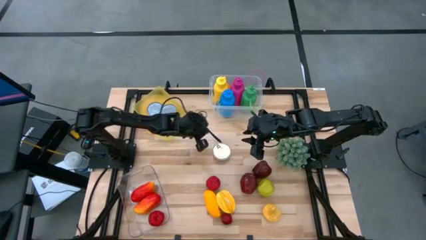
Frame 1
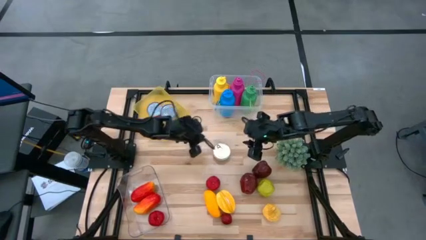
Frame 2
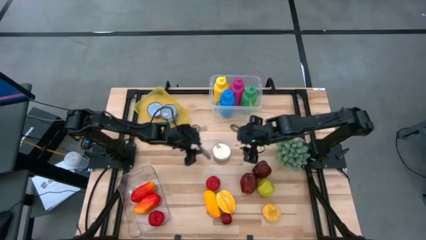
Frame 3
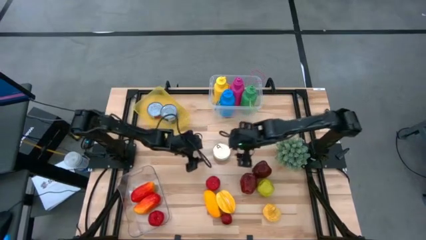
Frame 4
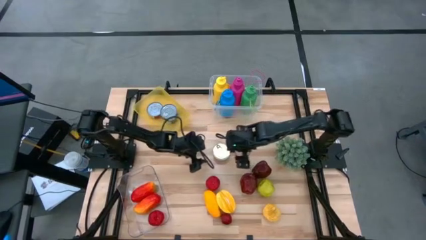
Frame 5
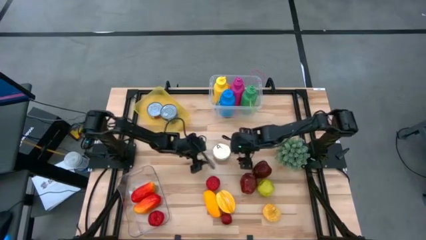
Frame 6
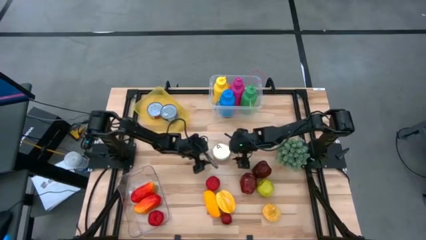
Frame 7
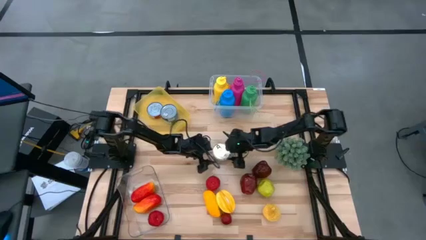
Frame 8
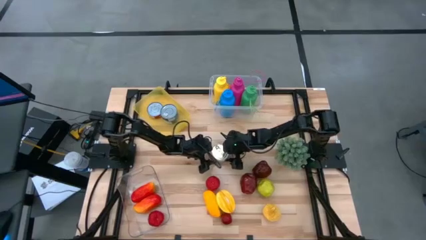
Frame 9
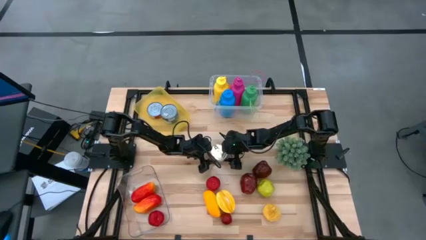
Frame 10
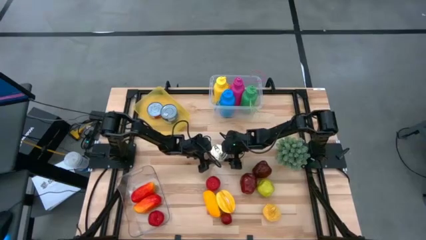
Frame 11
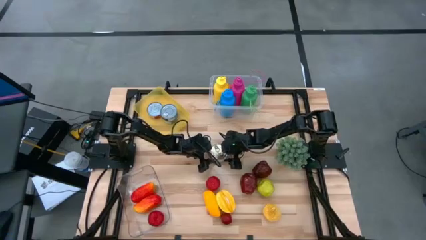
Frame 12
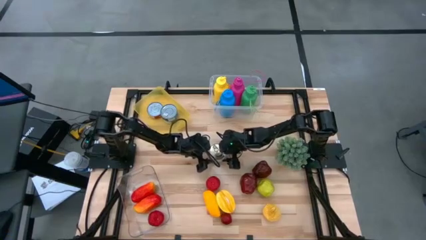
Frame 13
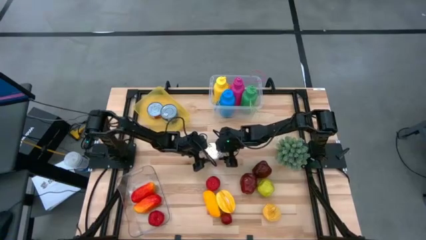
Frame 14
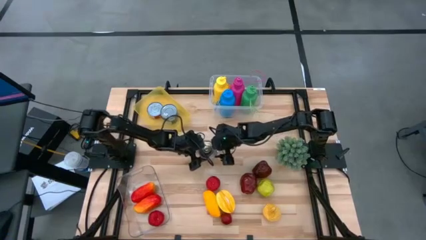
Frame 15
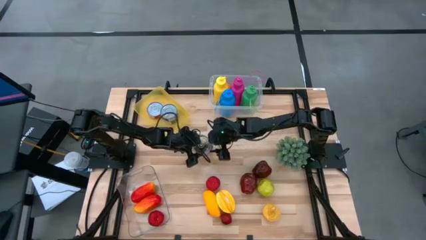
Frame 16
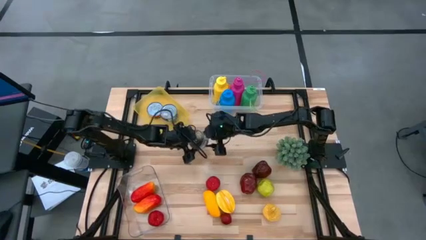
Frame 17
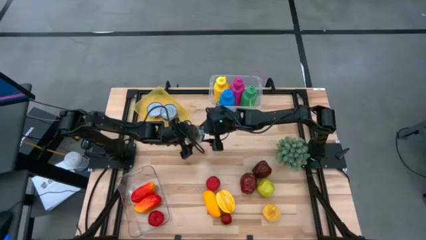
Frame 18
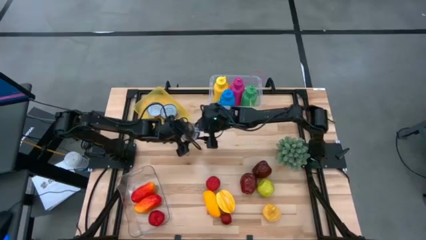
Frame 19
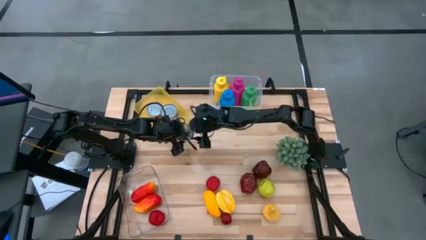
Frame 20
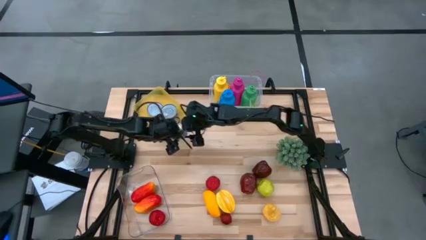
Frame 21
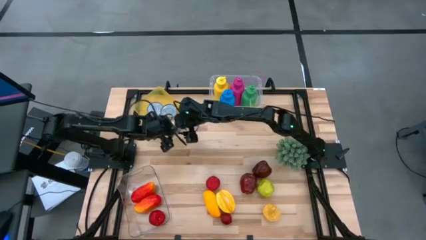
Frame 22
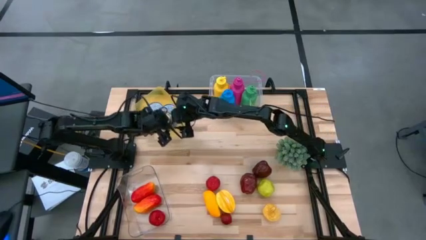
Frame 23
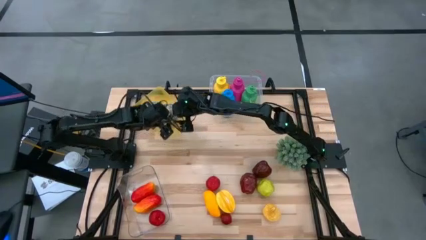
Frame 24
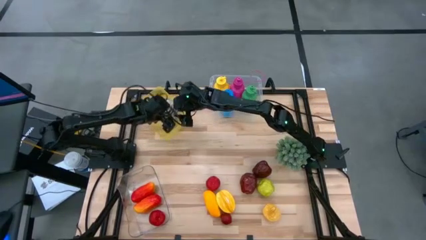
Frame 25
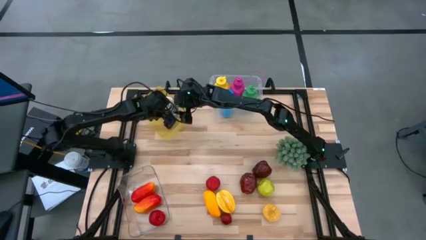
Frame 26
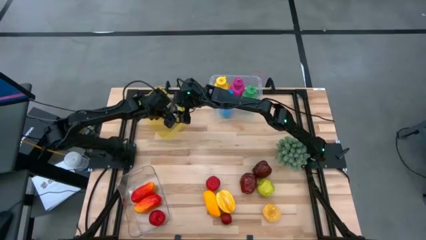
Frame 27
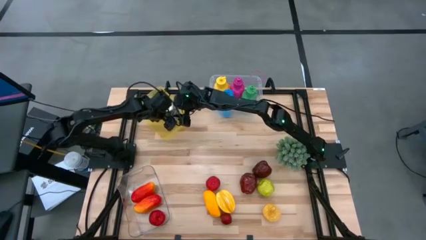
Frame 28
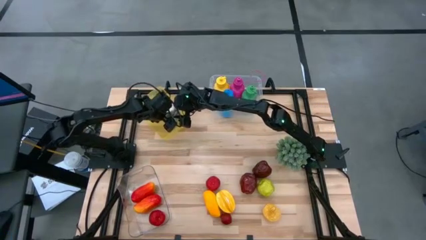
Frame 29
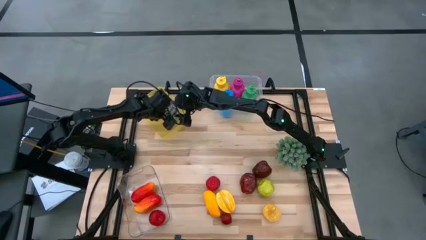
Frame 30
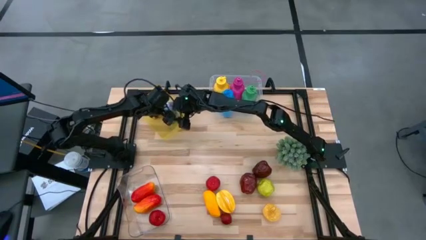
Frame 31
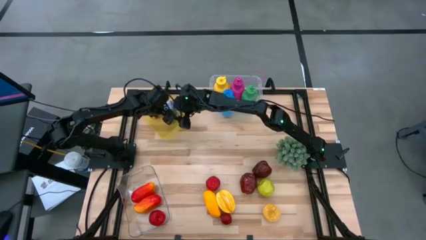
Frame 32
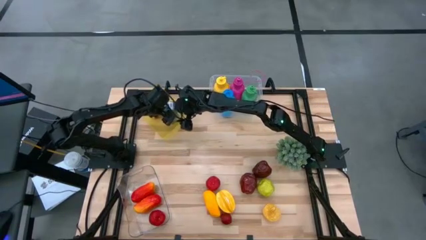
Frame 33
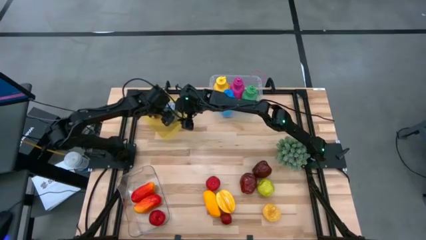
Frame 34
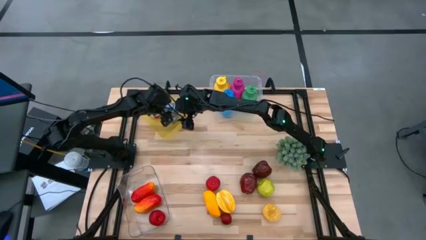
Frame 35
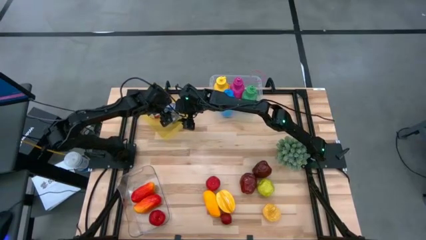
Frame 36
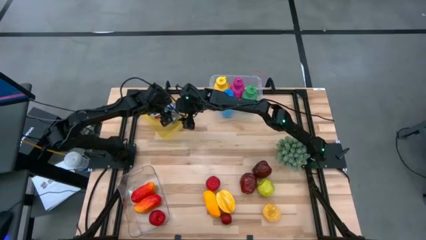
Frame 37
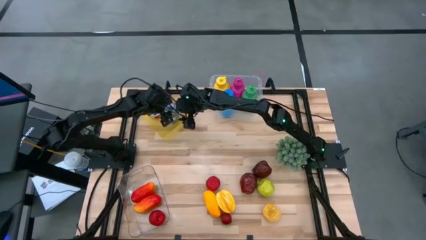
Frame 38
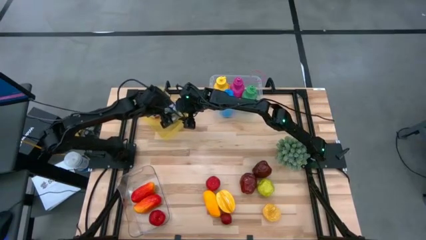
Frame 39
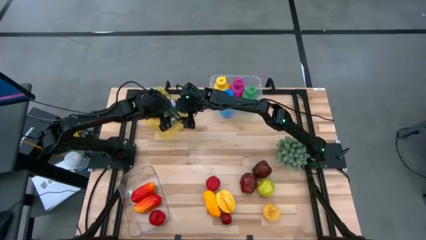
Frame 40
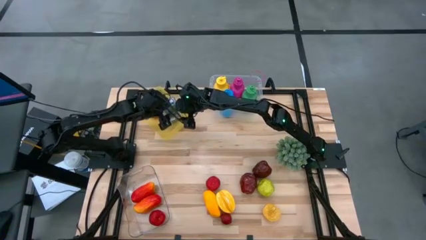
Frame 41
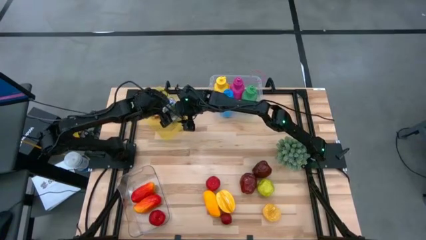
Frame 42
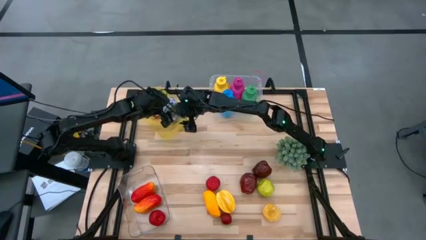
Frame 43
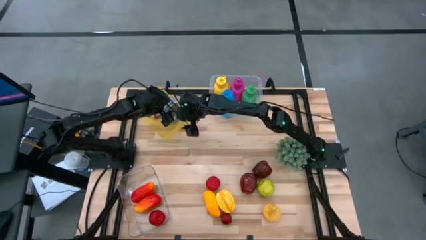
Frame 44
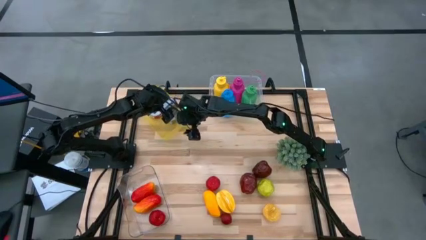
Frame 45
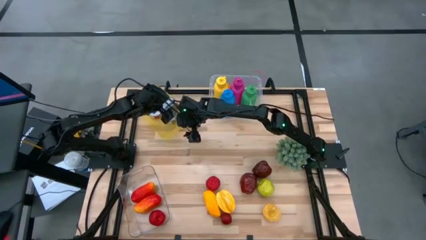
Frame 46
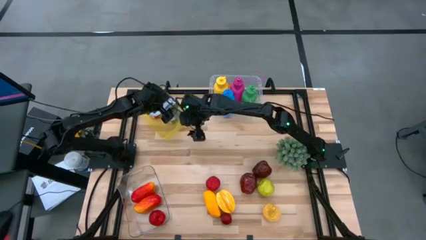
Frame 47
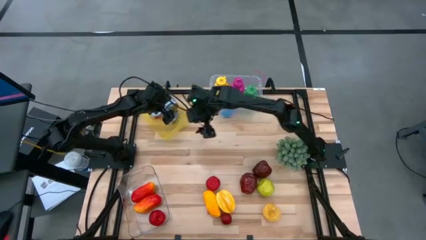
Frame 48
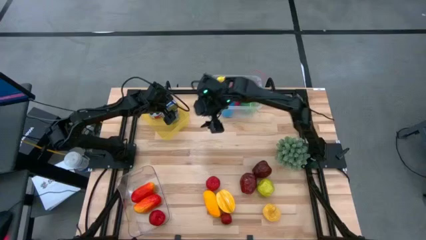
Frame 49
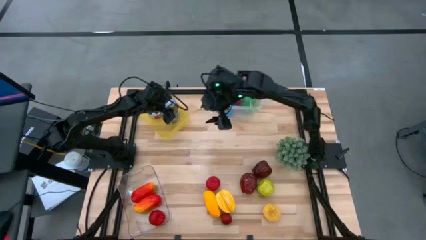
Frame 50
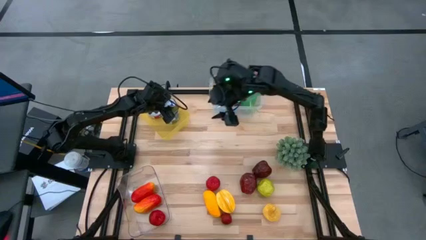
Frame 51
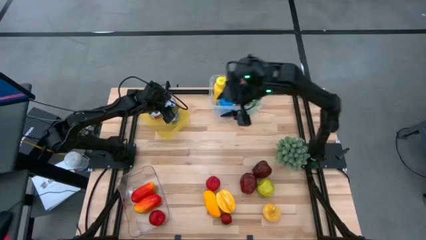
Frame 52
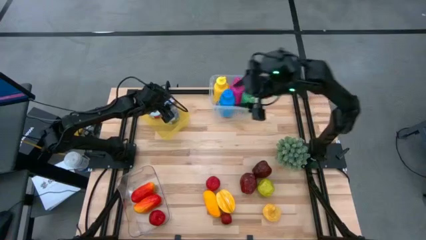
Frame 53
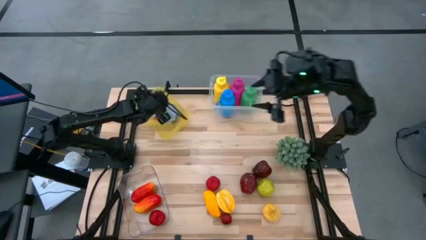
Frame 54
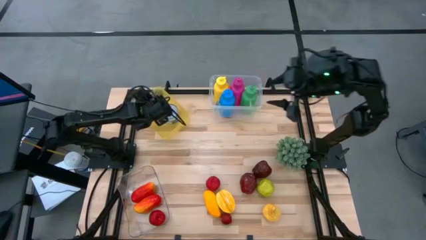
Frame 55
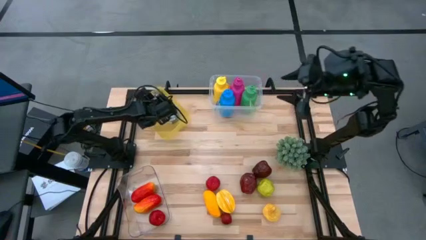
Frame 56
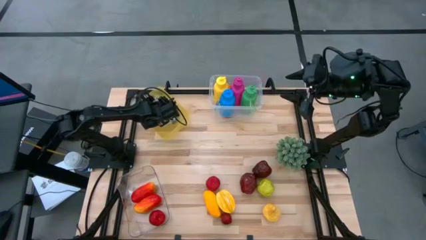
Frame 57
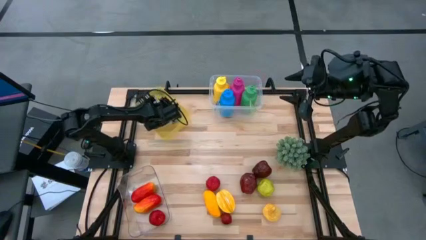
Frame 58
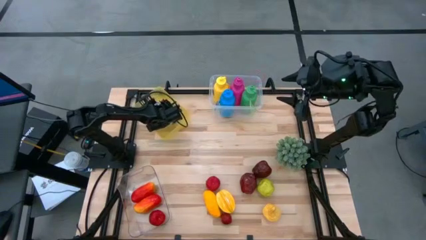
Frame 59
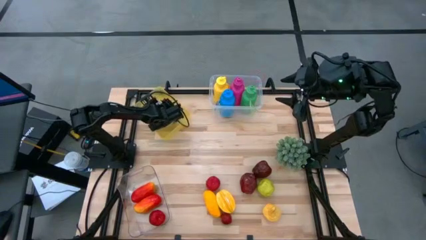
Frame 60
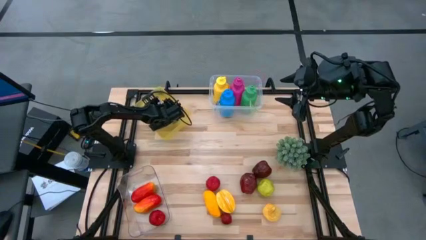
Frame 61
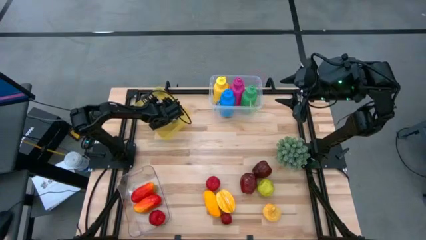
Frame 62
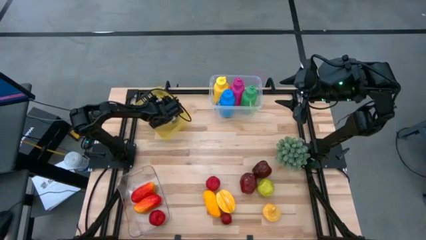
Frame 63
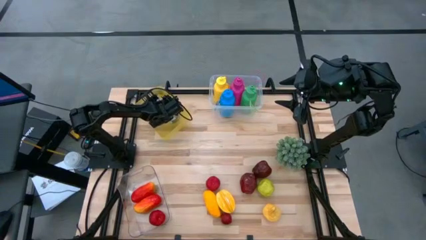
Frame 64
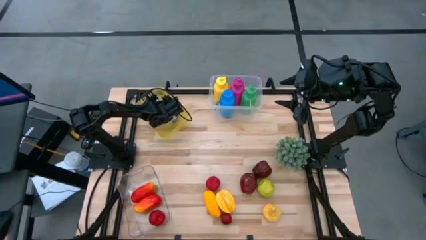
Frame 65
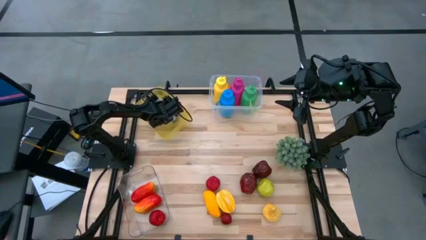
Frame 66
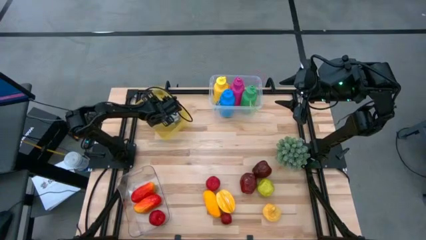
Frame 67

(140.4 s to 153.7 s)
Task: Pick & Place Food Item
Put the blue tuna can into the yellow bin
